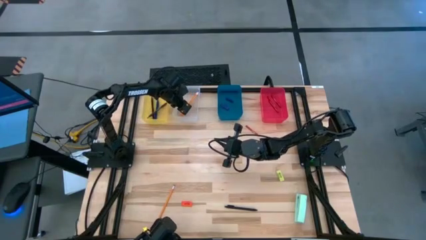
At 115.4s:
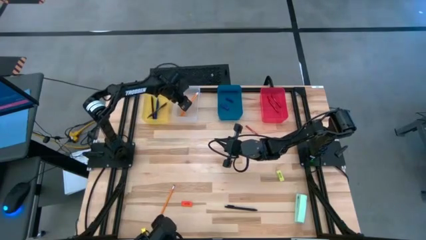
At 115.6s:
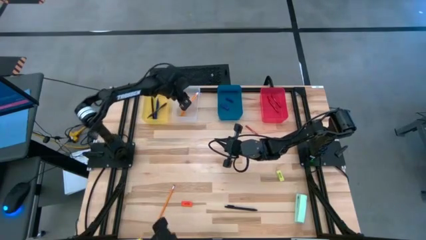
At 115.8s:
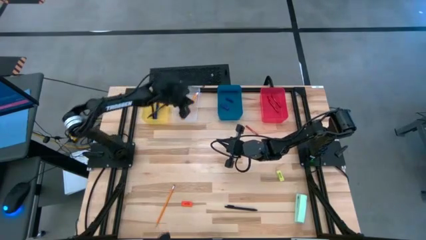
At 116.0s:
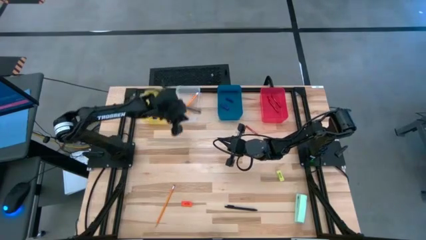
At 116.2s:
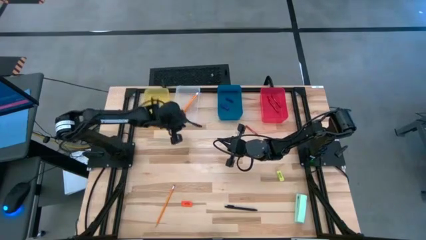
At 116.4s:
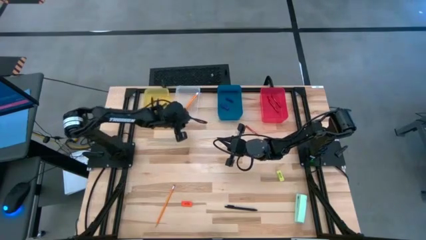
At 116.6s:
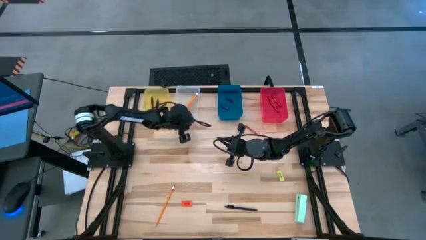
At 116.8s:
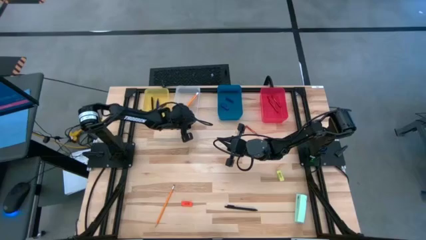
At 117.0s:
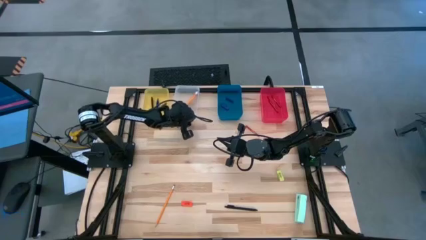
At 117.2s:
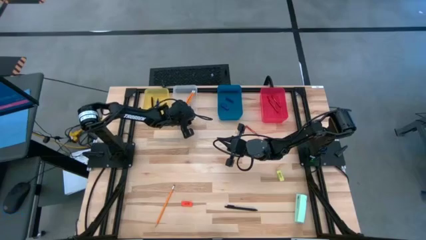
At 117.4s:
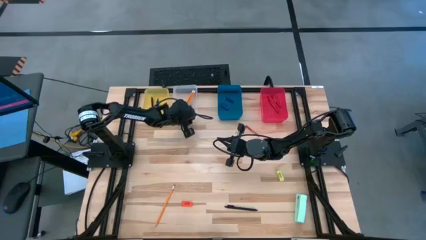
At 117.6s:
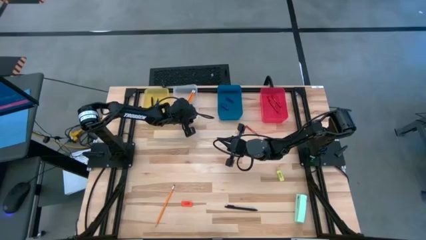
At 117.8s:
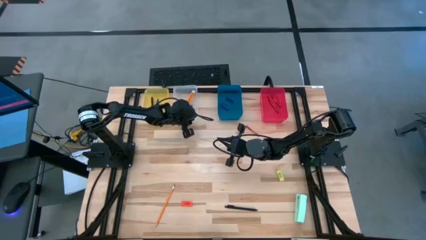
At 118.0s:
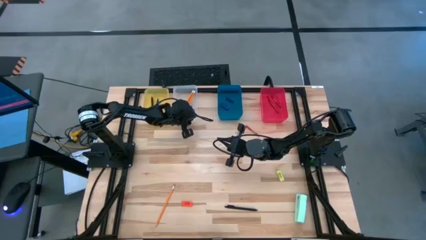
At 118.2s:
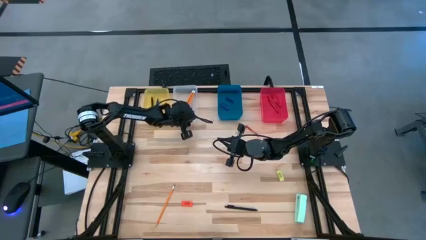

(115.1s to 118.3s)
Task: Sort crayons/erasers/pens/pencils in bins
Adjust the transparent bin on the table

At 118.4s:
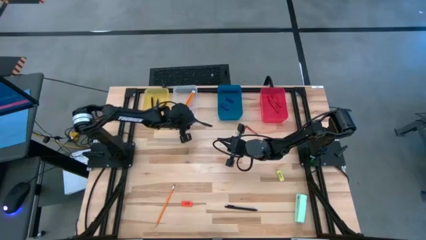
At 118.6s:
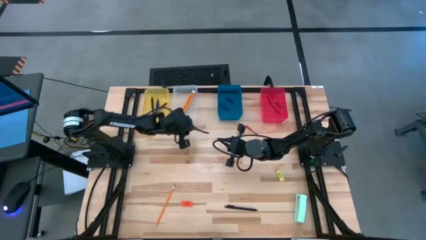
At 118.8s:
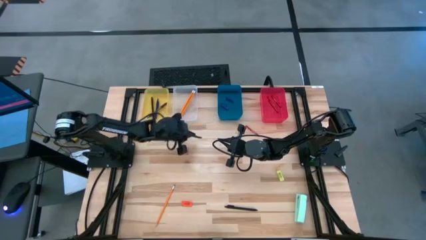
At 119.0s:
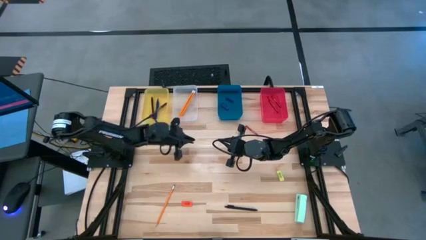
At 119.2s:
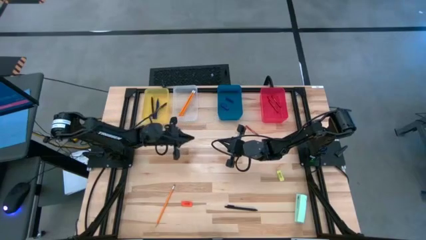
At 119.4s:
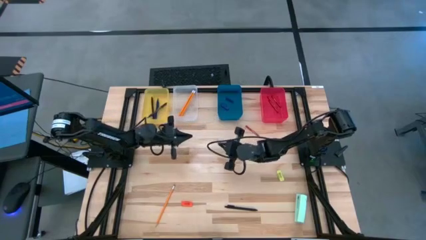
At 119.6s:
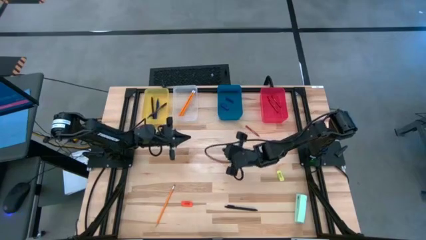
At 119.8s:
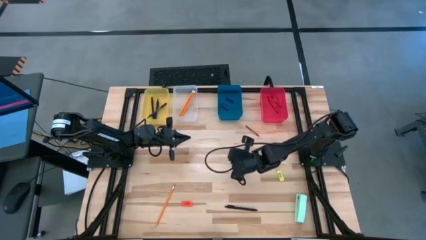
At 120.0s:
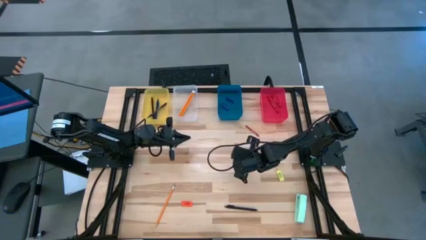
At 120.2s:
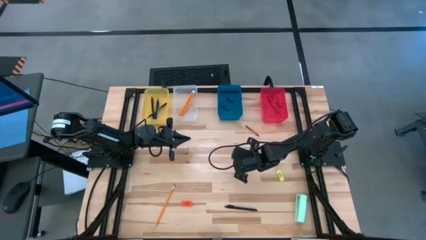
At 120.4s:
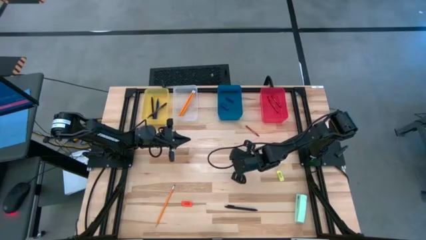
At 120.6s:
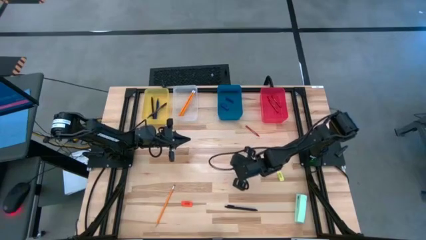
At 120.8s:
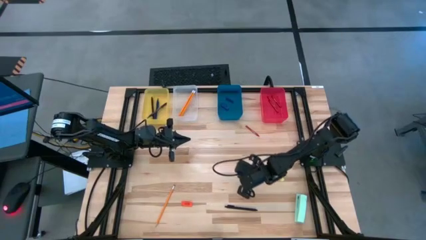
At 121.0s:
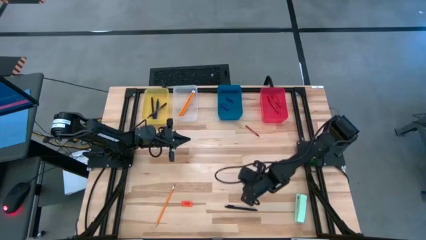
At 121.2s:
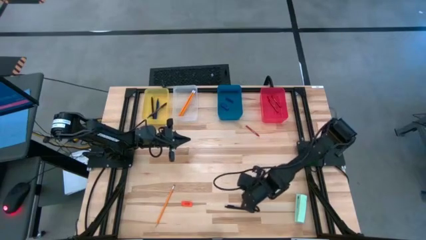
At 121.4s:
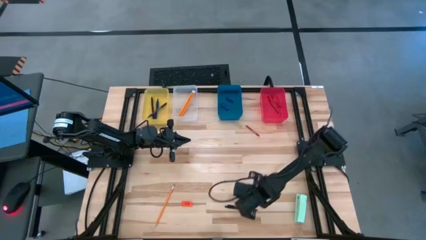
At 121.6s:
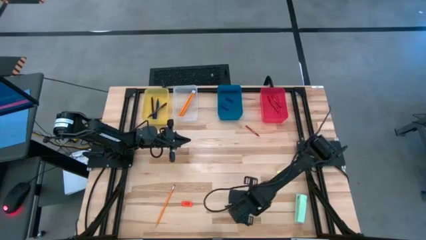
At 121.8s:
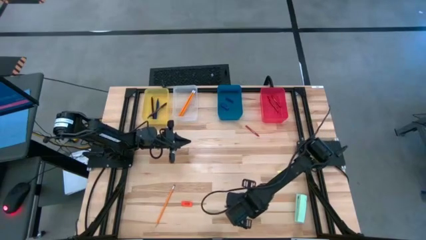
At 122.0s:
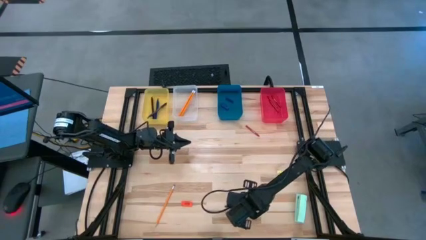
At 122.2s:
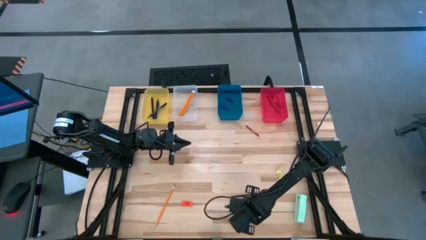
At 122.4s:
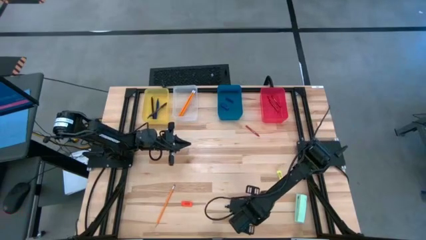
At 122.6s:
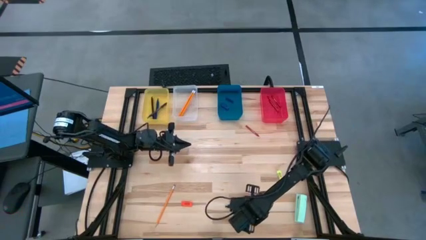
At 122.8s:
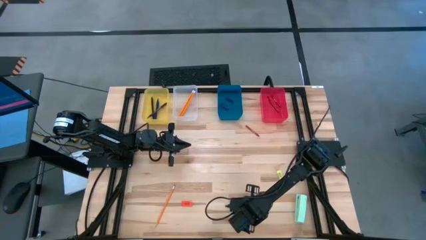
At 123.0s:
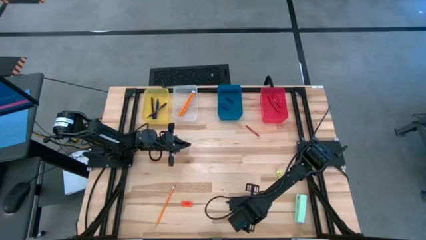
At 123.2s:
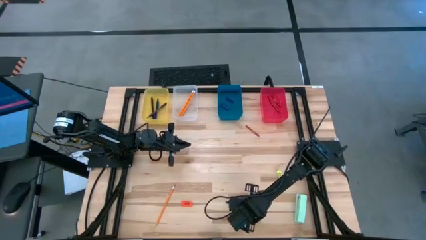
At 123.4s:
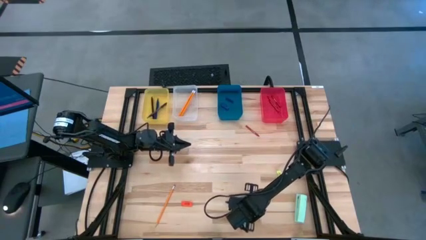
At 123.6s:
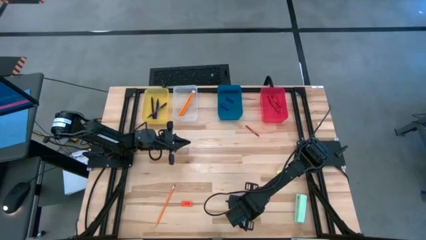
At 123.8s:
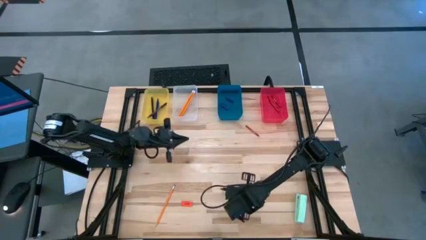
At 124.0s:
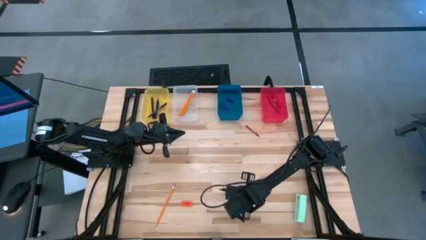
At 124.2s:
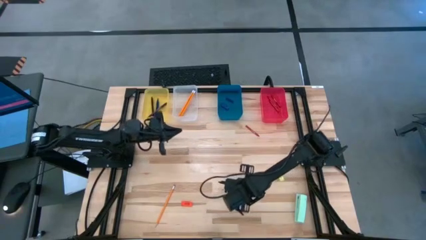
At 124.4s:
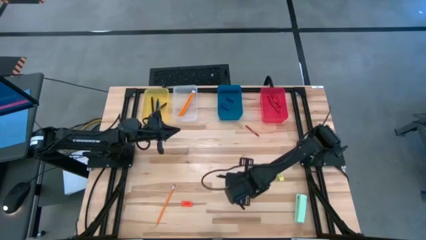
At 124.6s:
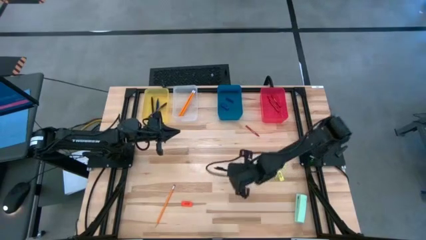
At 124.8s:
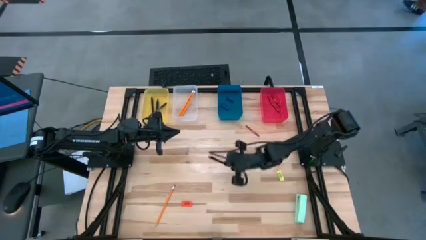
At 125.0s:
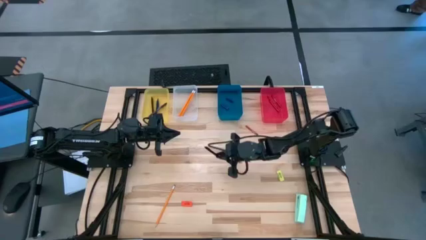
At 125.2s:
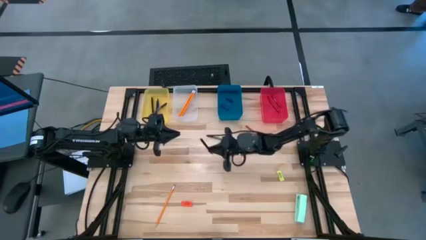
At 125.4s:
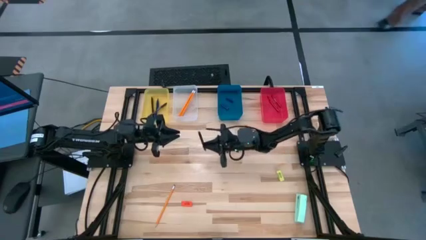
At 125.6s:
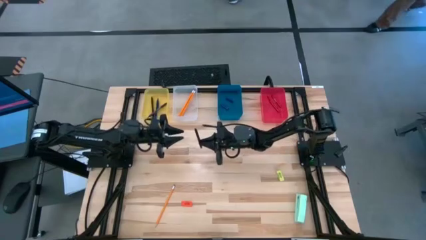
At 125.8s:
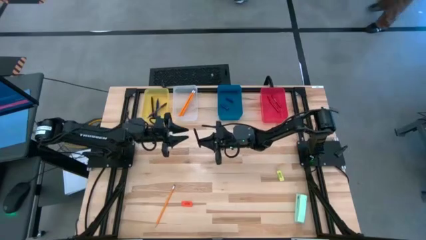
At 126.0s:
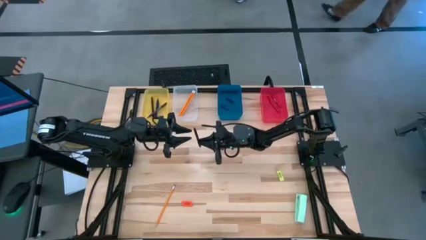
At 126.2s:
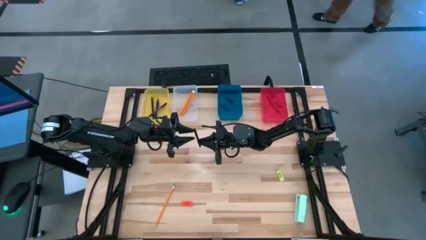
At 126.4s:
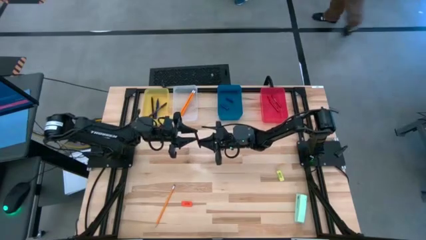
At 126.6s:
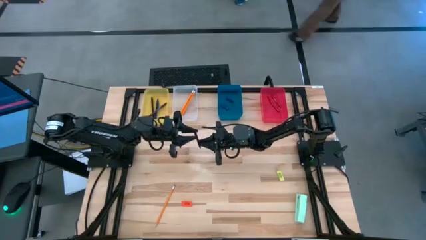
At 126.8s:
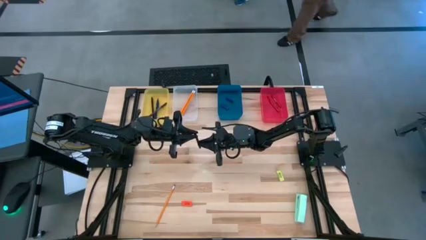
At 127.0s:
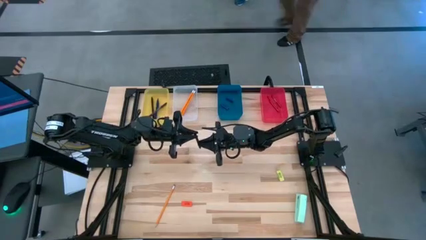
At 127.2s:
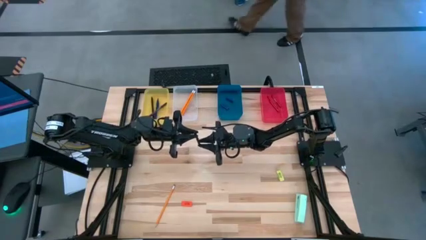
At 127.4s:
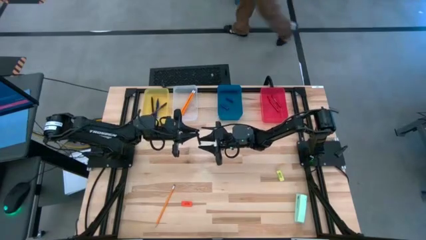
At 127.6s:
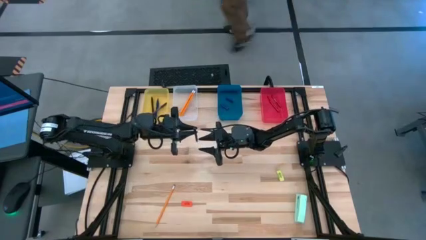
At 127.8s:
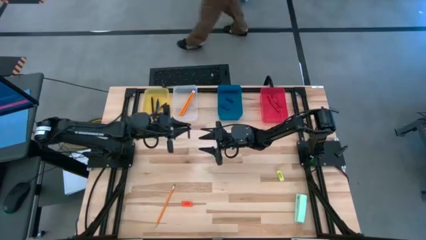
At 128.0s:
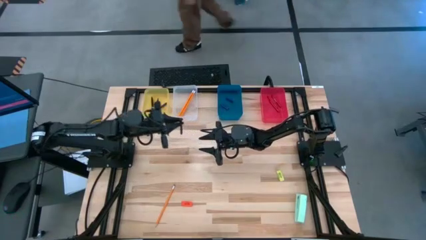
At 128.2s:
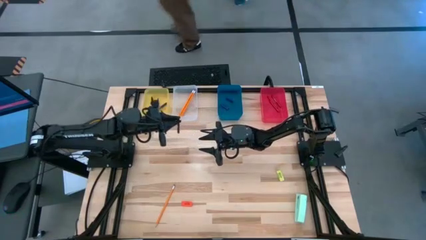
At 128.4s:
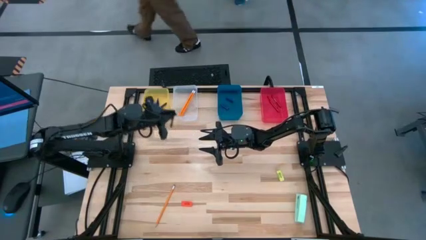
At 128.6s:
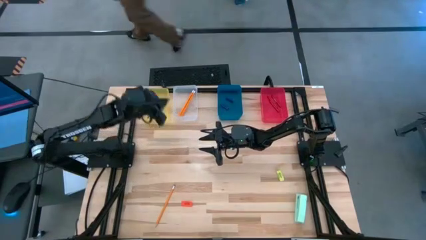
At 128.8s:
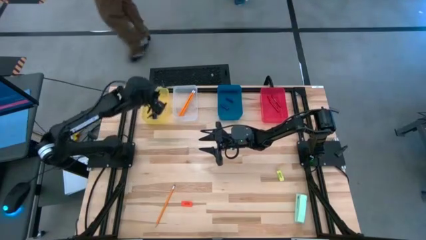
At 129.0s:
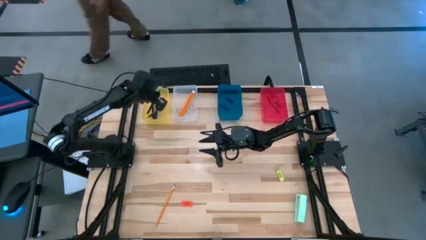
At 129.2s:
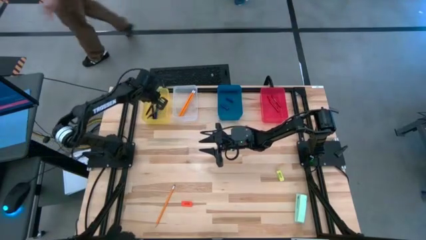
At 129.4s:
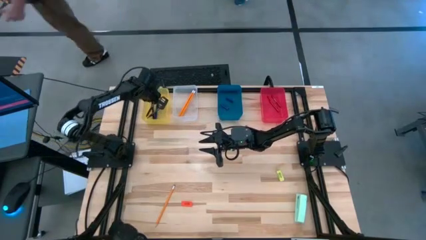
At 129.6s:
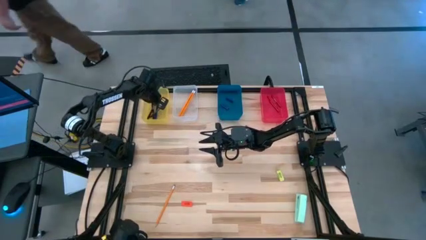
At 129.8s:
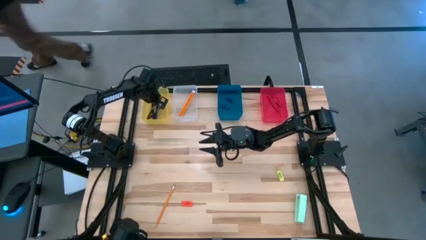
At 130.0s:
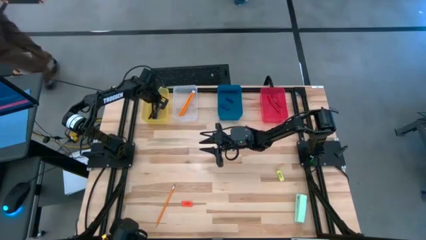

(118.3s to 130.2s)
Put the black pen into the yellow bin
